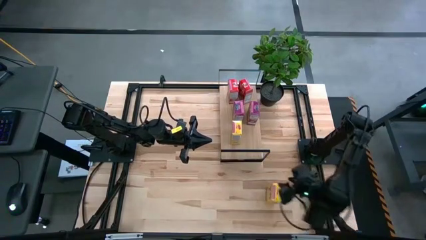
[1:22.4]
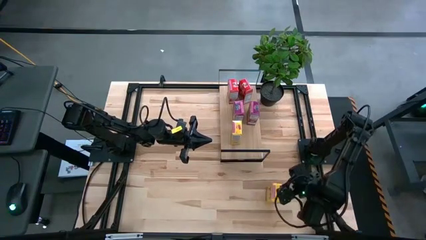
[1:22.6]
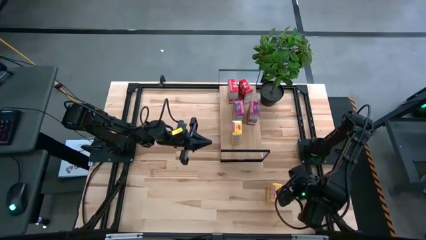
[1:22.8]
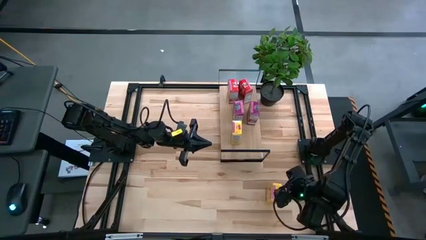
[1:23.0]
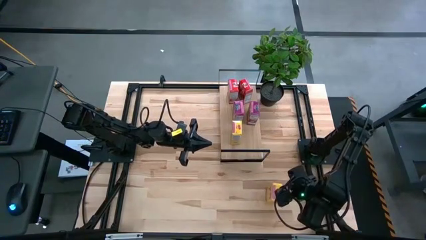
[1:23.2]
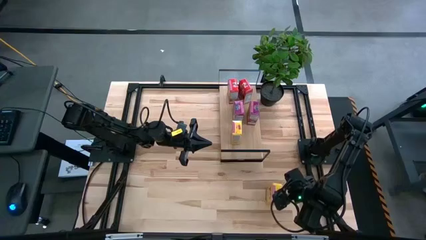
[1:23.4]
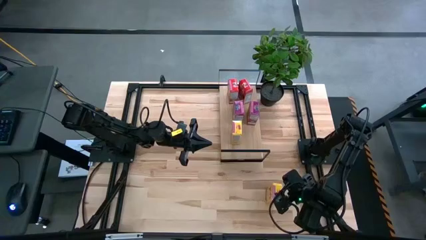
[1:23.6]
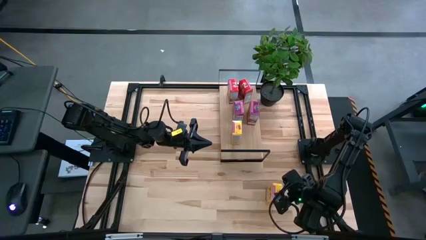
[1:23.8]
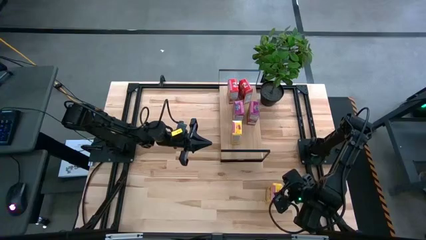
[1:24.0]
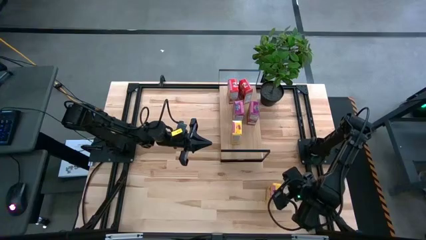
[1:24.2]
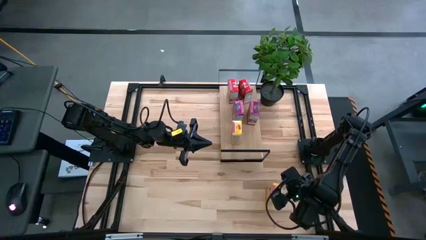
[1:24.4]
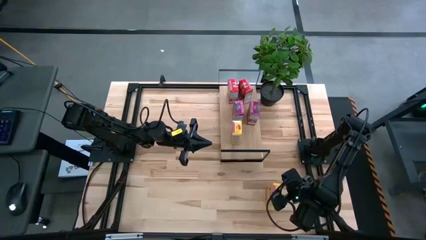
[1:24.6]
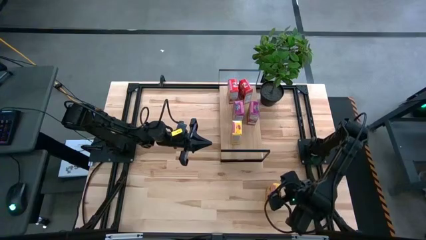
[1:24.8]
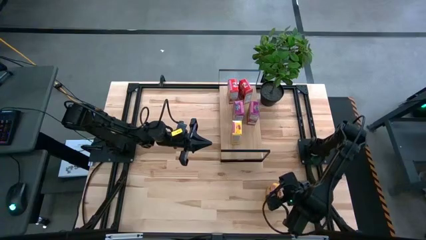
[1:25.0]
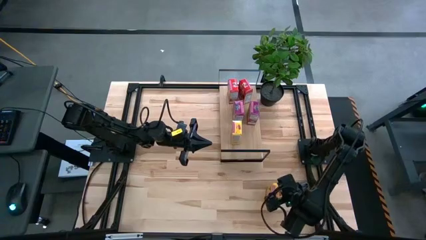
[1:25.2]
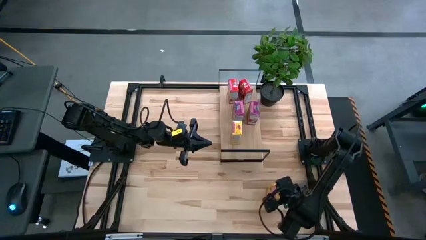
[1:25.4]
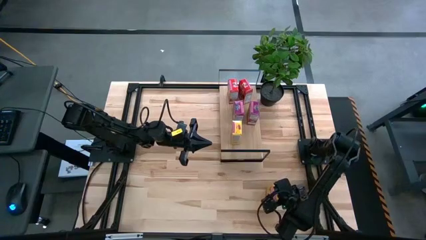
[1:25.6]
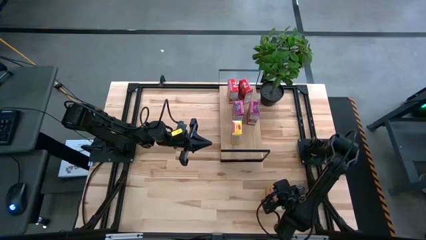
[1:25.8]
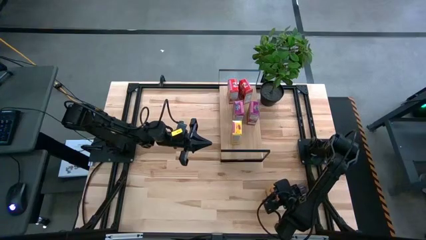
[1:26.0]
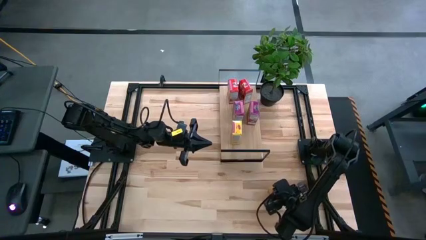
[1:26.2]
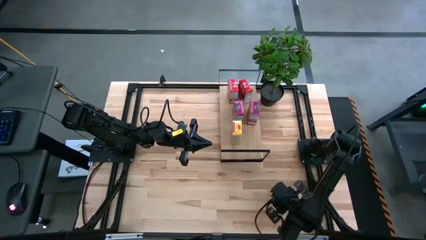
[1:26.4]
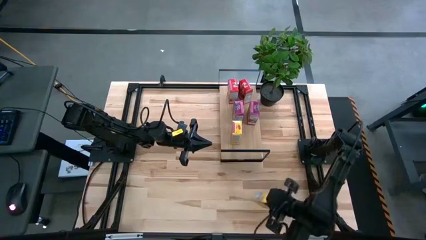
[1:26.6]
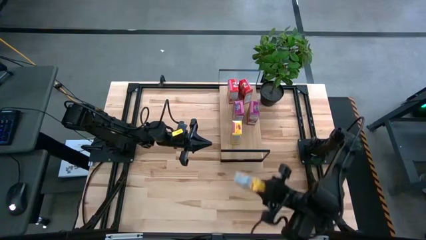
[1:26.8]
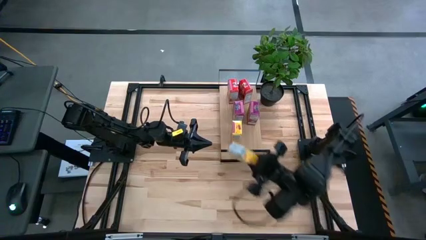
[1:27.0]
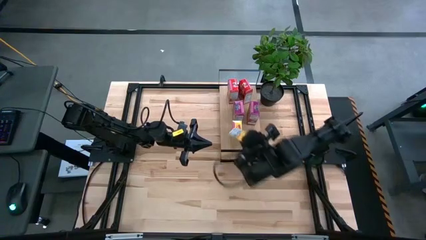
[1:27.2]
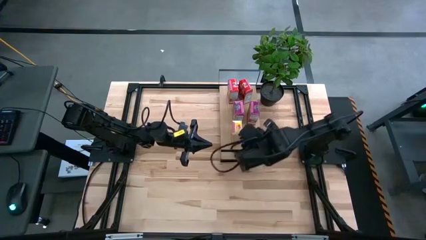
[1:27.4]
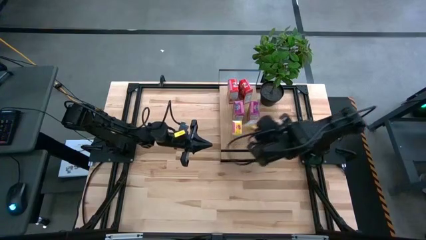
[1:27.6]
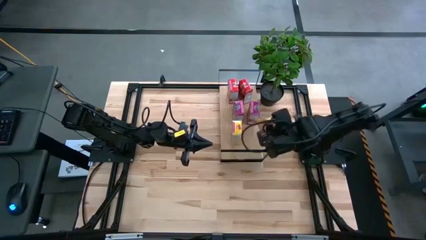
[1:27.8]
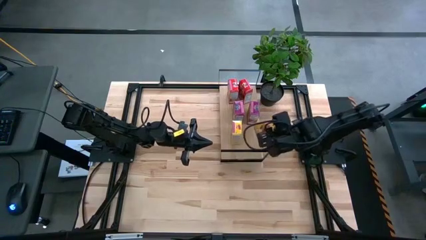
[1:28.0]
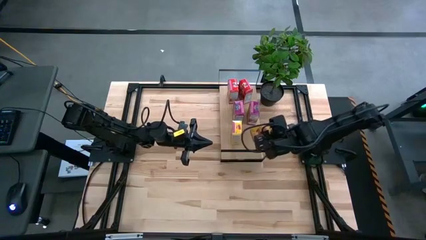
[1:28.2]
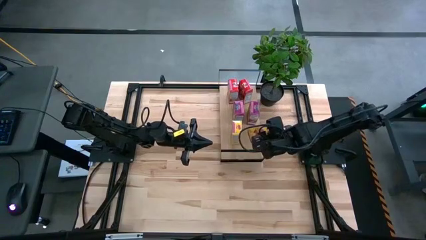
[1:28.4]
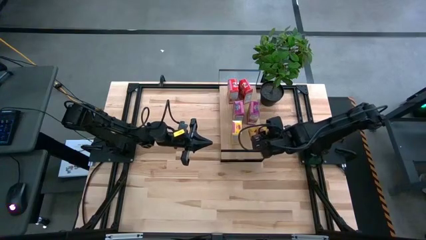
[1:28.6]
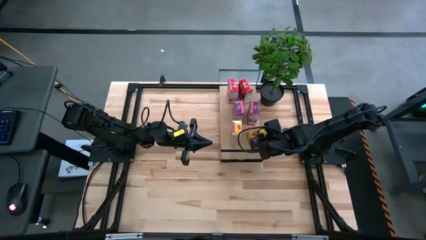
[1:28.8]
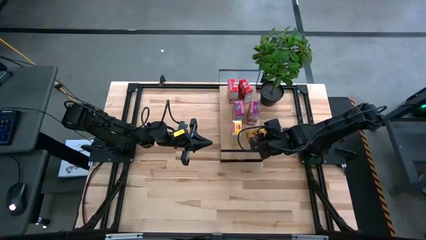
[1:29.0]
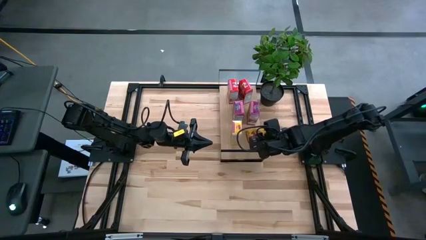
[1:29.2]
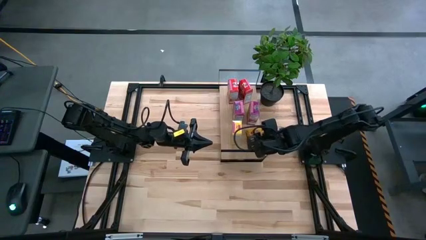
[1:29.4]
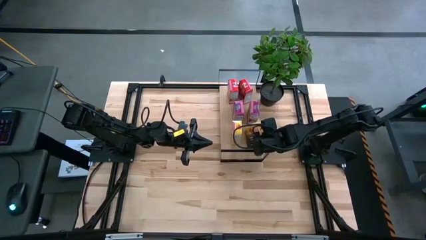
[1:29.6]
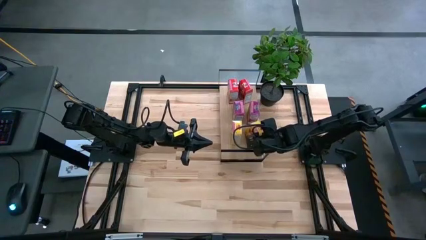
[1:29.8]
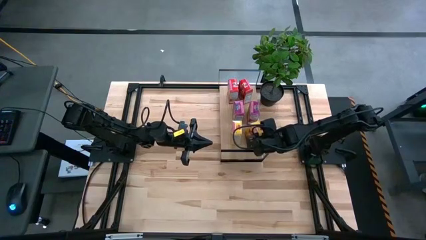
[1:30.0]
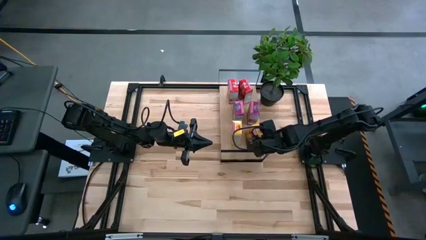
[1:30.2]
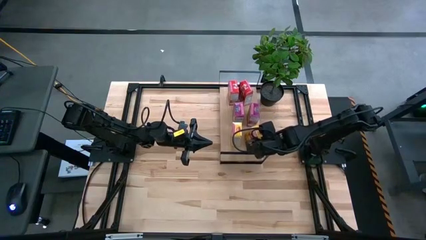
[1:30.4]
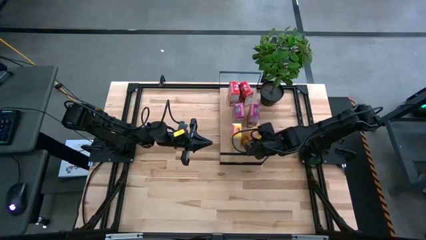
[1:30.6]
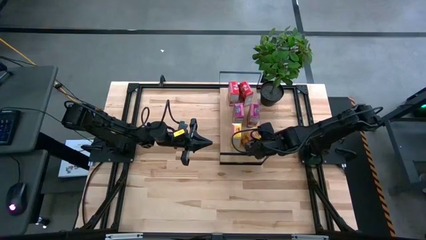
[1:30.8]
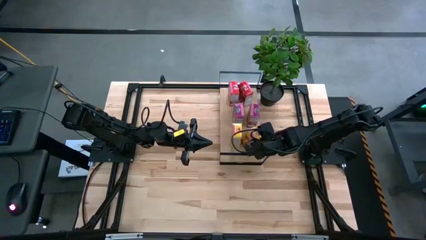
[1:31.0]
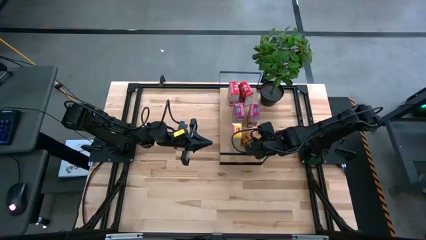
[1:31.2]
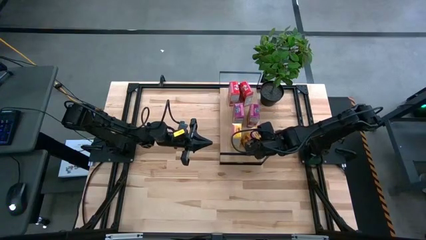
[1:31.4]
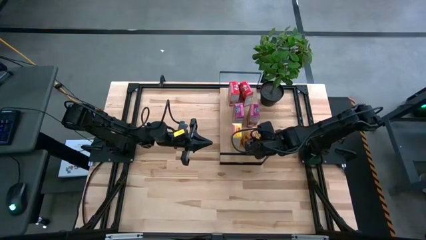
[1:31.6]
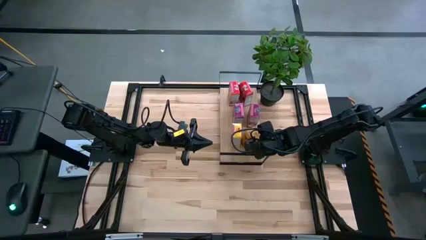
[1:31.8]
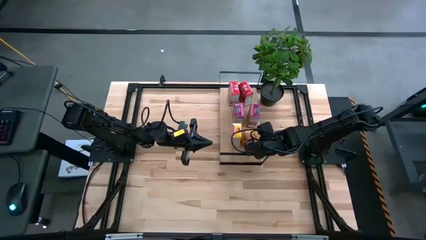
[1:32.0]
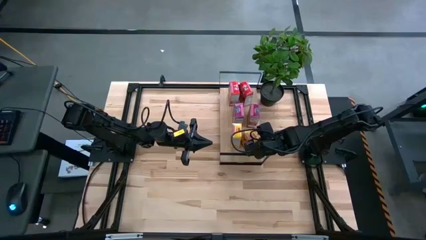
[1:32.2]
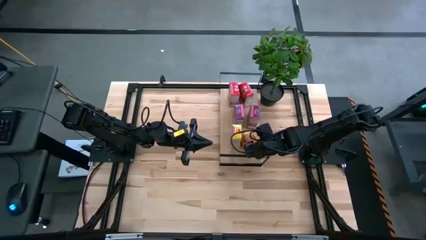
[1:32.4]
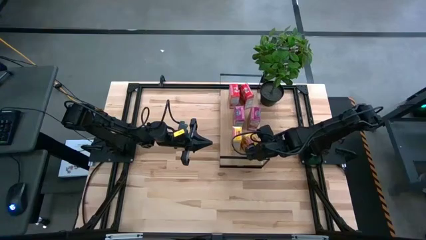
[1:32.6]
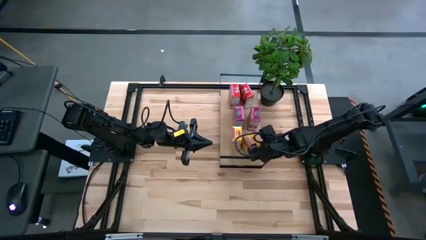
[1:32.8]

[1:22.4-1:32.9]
Task: Stack cereal on shelf
Put the yellow cereal box on the shelf

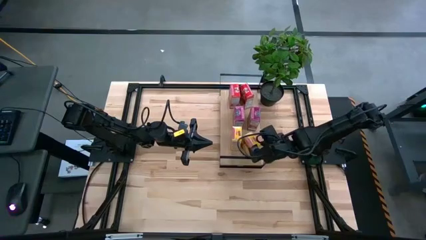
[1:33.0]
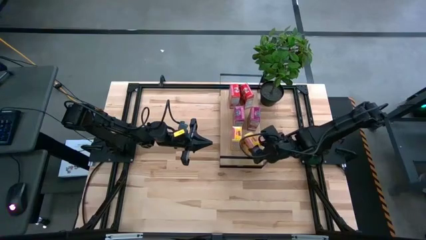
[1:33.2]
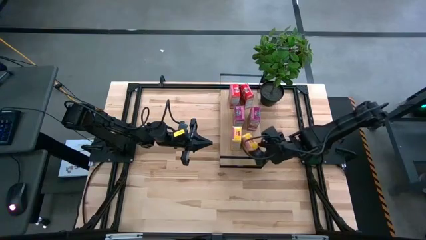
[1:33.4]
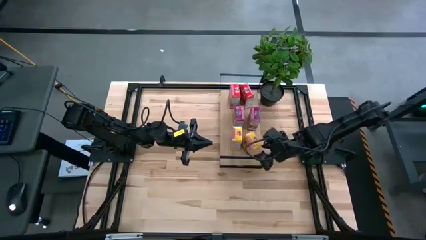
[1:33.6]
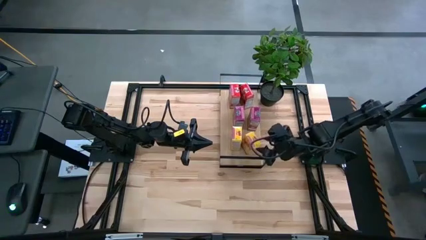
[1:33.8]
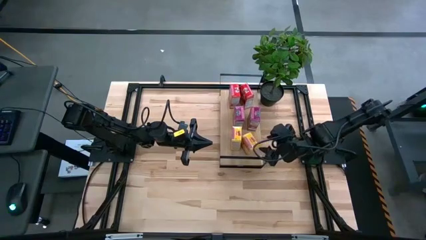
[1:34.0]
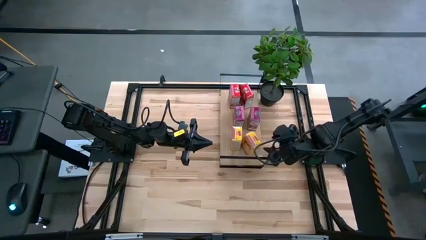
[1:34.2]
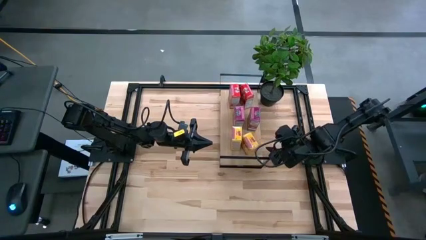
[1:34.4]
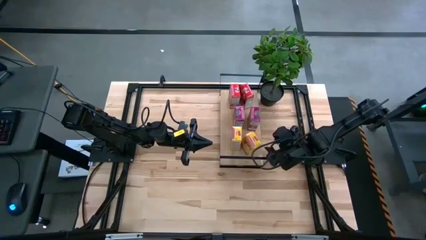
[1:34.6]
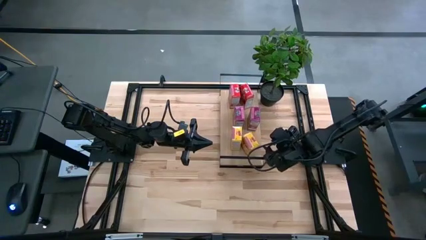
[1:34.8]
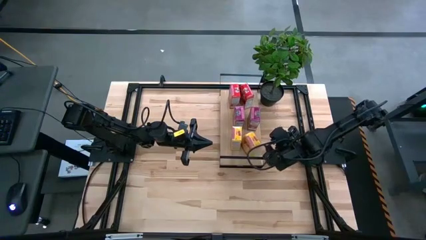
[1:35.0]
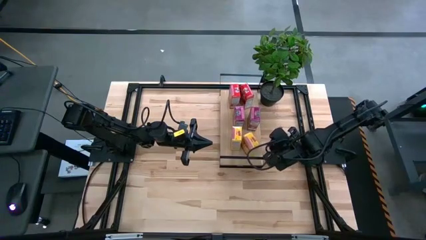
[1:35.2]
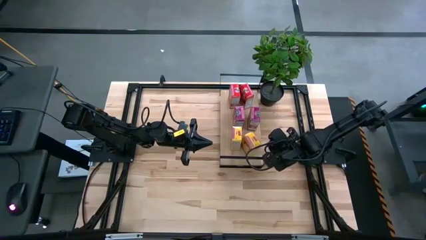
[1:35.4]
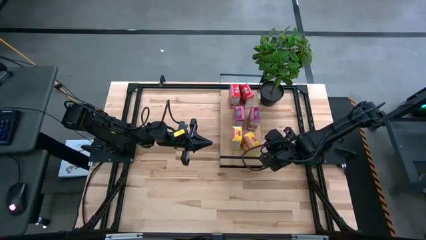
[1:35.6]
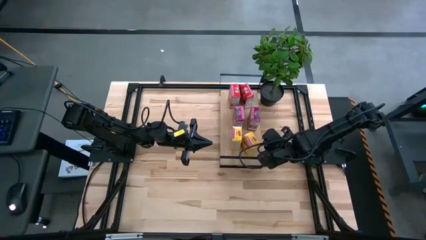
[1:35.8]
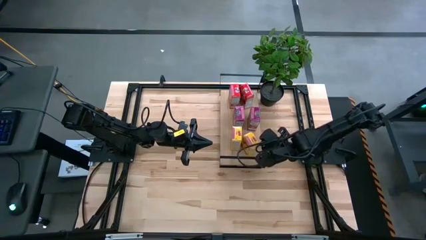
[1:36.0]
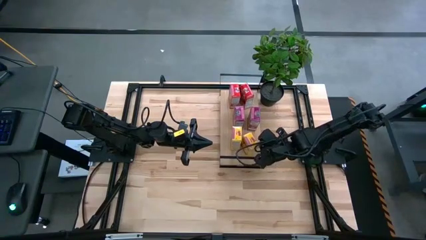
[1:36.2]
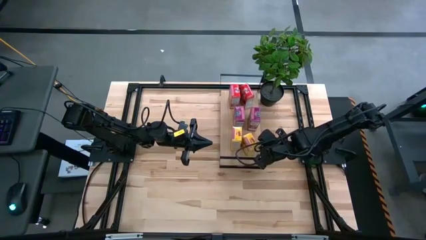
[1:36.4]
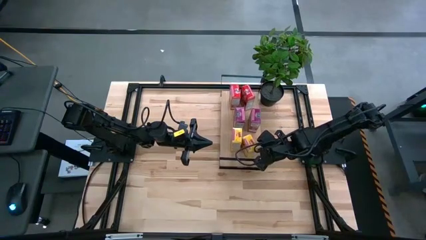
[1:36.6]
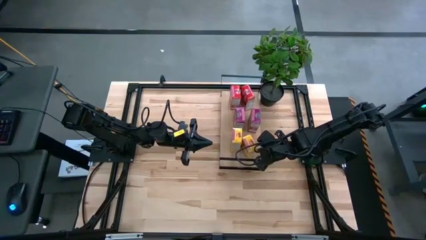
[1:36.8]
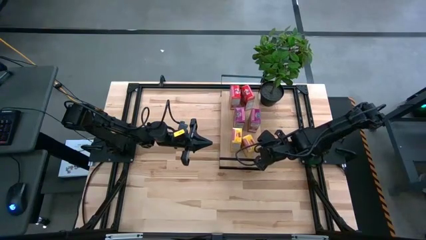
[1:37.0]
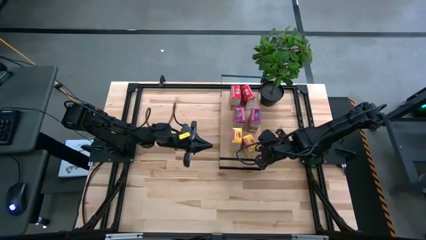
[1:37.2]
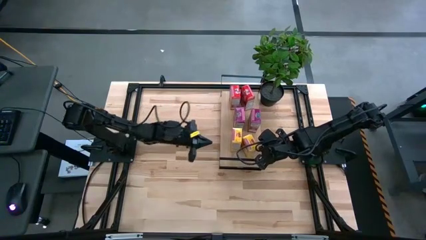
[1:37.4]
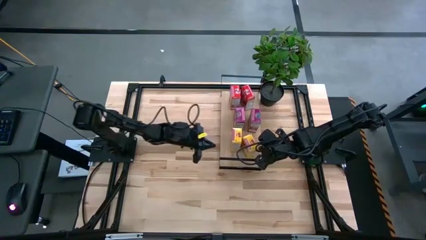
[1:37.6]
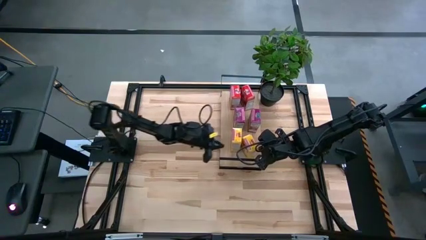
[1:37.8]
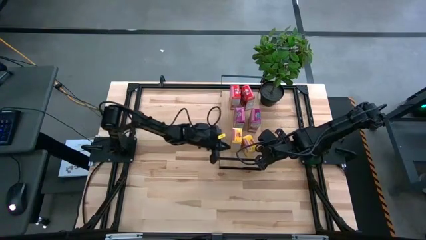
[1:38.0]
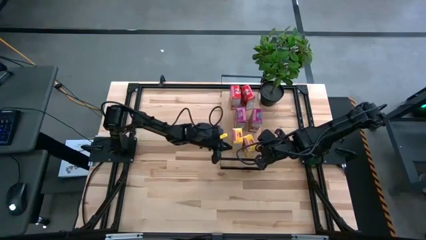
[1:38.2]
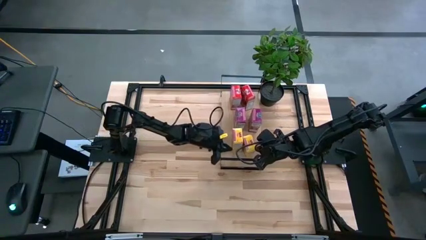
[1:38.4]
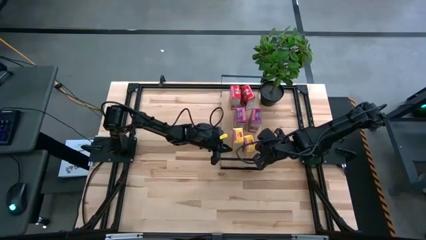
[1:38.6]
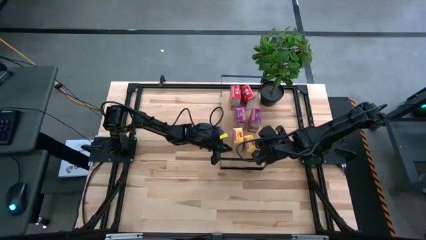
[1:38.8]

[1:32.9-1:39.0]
Adjust the yellow cereal box on the shelf

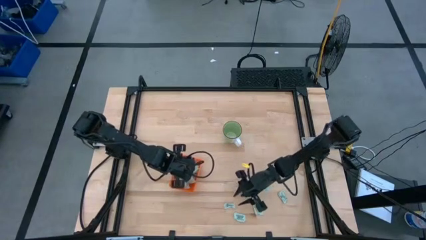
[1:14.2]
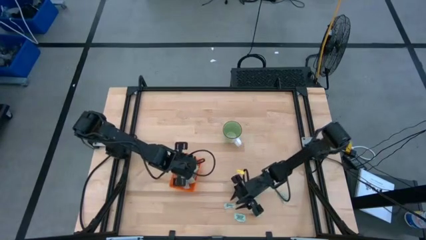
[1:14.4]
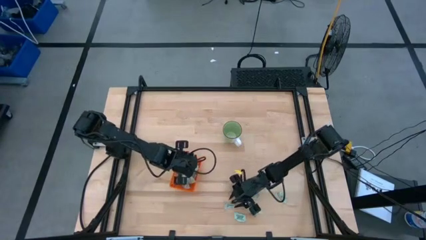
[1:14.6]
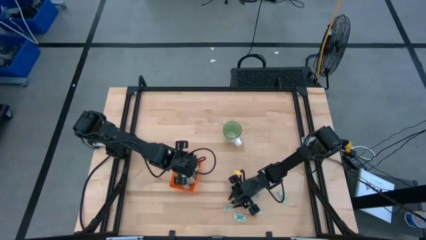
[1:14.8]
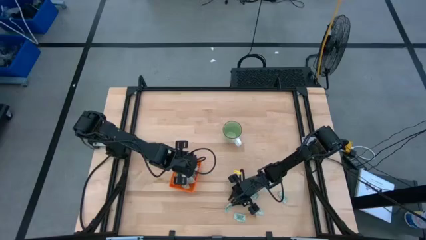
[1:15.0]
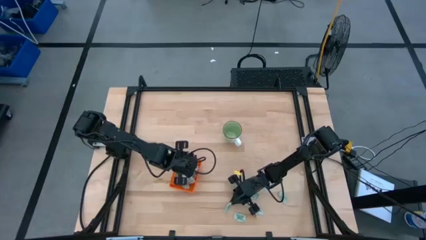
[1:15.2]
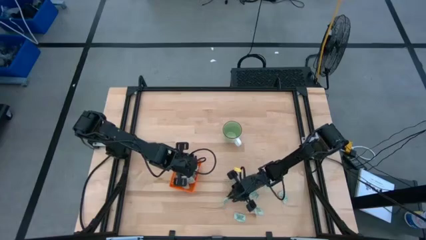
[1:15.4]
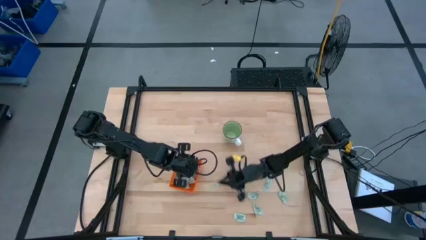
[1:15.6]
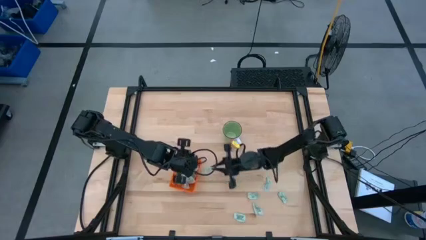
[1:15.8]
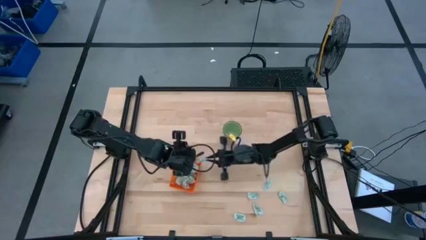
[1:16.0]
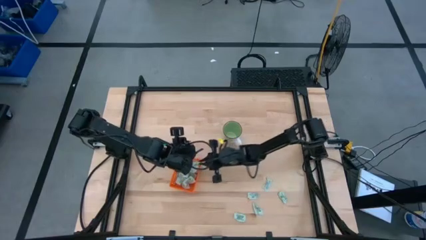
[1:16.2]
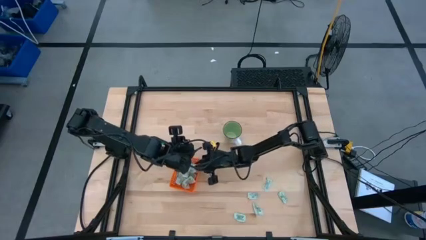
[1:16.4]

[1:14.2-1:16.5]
Task: Pick and place Stevia / Truvia into bins
Put the light green stevia packet into the orange basket
